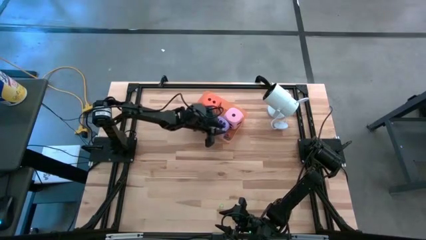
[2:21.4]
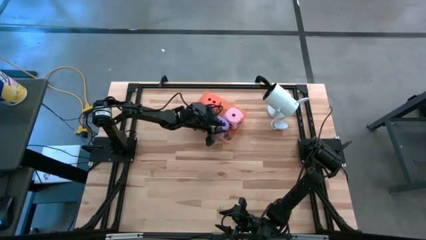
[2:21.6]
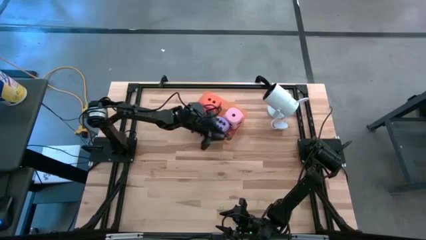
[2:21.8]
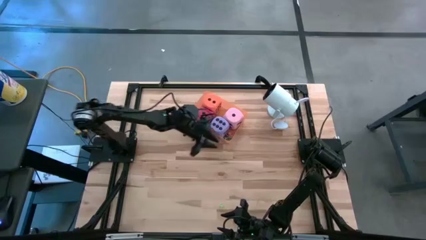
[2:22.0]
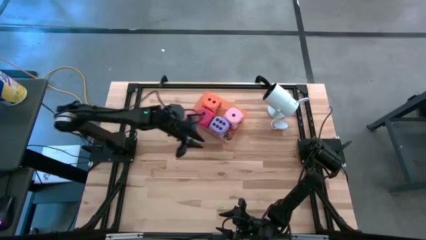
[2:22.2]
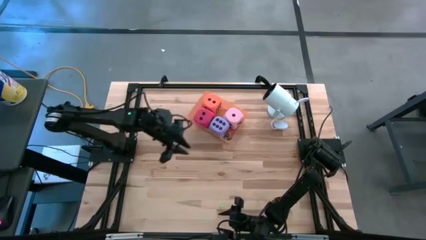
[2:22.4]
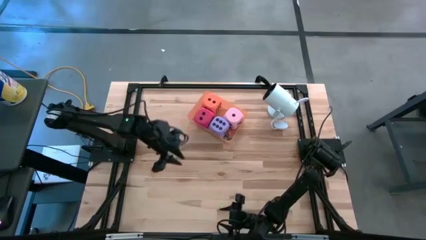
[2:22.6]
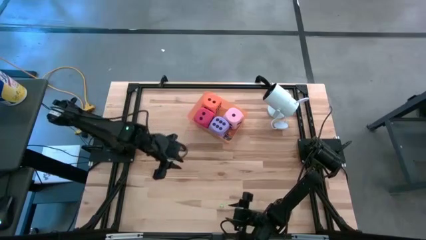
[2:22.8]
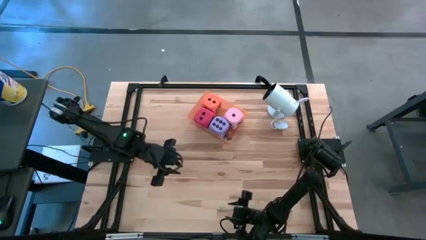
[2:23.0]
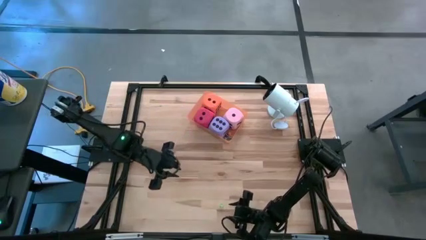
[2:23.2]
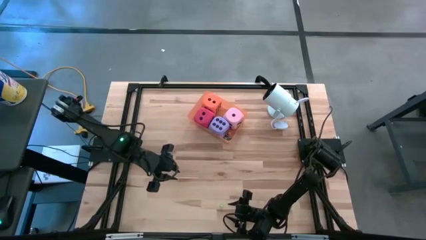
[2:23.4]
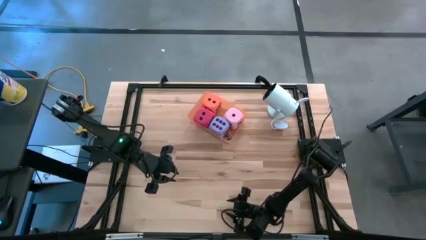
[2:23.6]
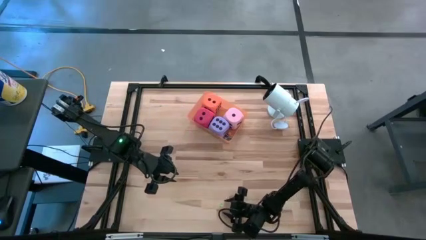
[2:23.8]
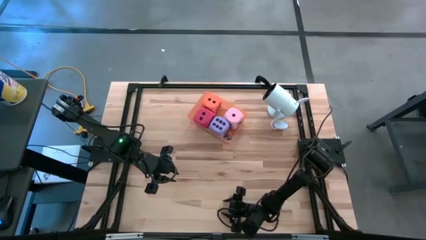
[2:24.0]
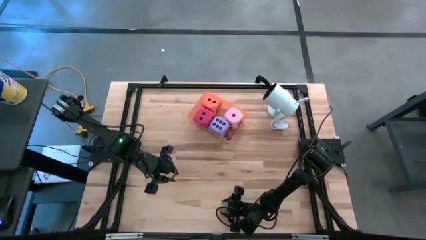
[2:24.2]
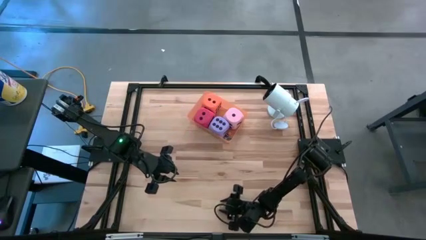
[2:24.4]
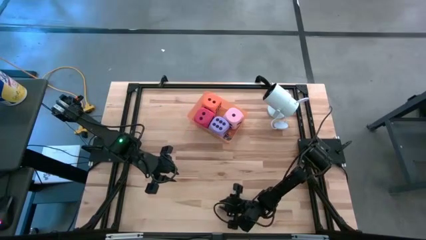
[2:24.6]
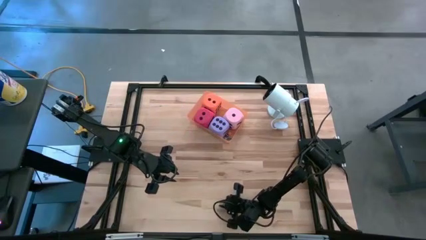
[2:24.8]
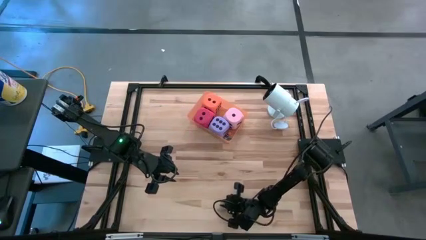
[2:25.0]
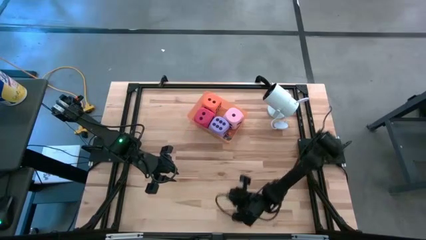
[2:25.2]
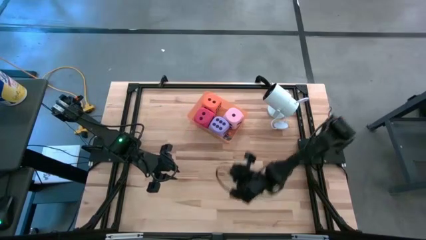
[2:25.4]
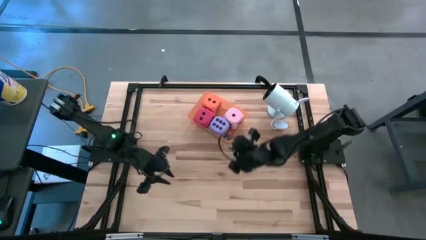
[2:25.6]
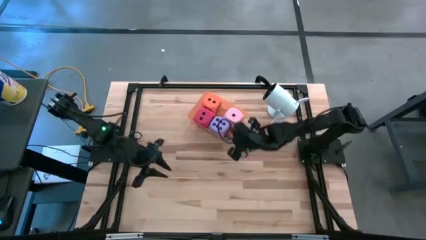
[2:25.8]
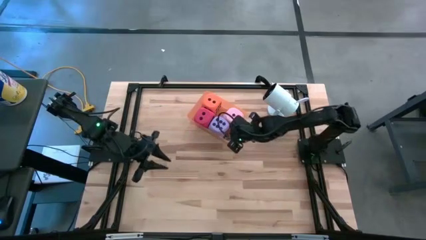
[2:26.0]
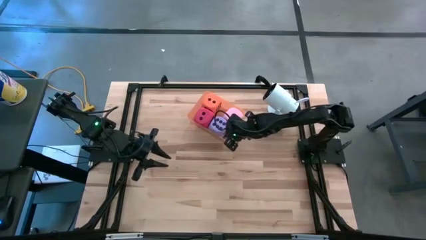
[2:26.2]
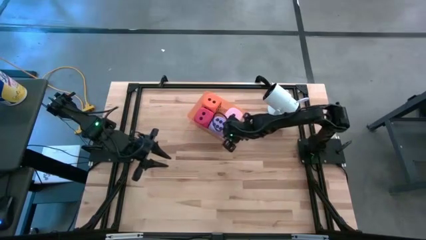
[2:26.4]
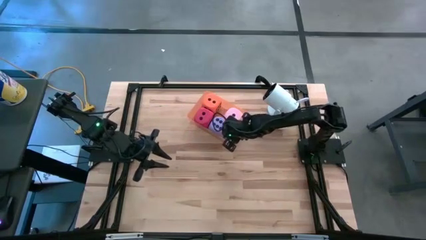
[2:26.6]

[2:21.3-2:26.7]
Task: Pick & Place Dice
Put the small green die into the orange bin

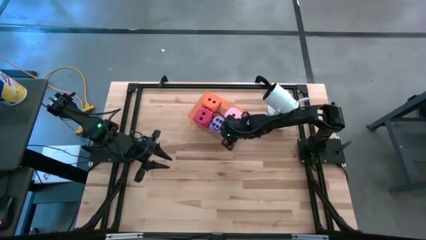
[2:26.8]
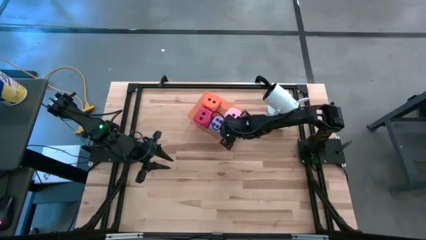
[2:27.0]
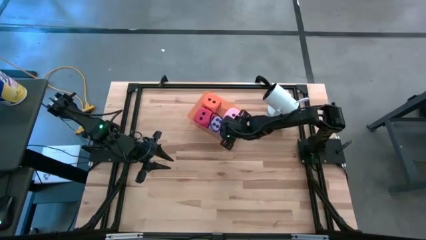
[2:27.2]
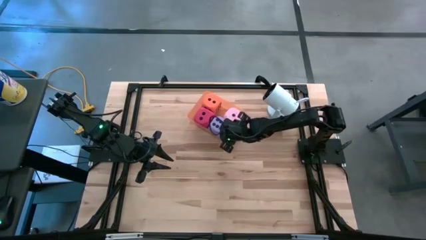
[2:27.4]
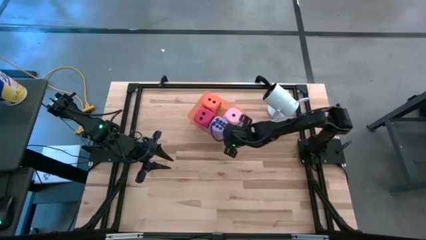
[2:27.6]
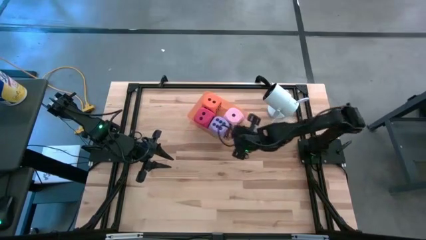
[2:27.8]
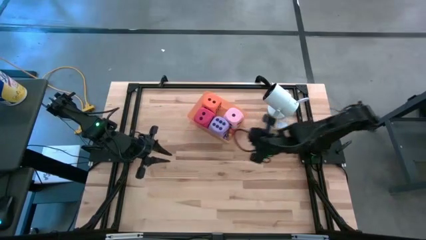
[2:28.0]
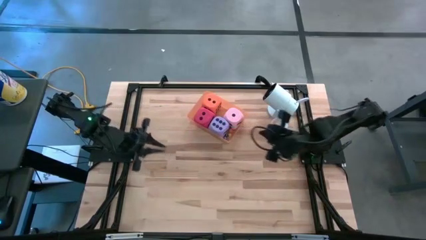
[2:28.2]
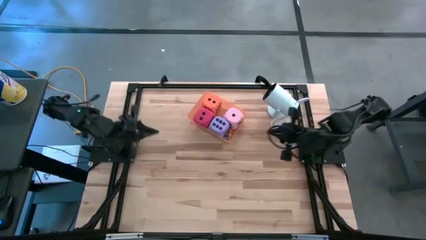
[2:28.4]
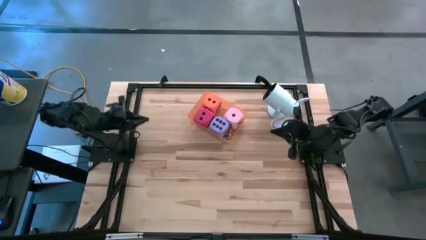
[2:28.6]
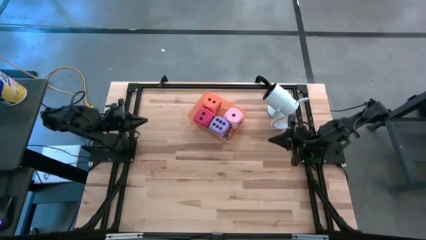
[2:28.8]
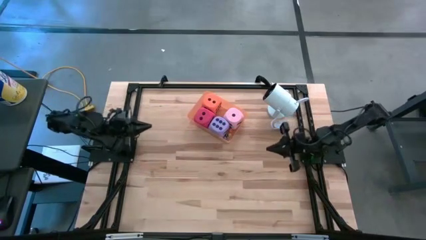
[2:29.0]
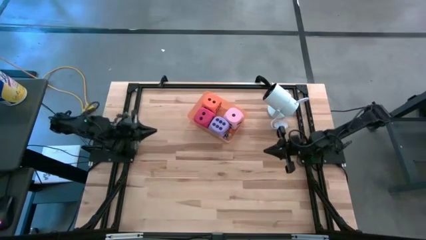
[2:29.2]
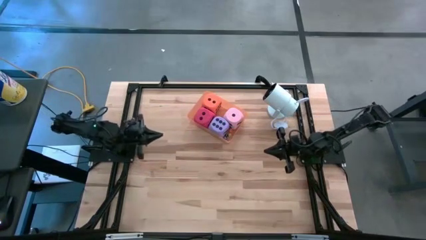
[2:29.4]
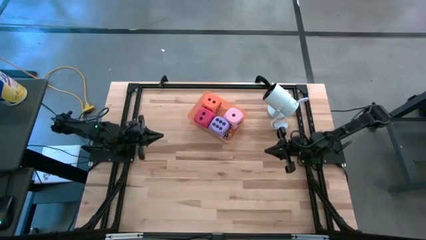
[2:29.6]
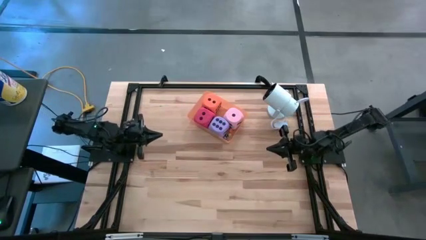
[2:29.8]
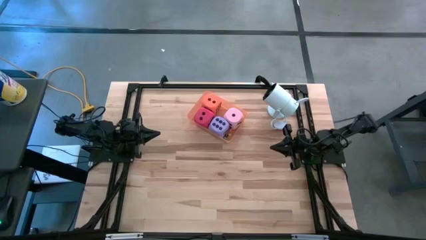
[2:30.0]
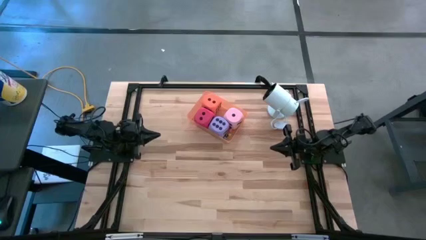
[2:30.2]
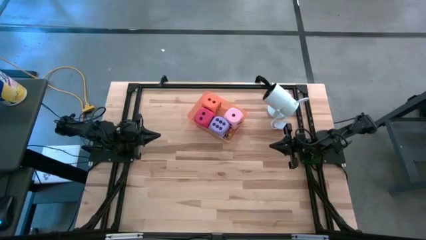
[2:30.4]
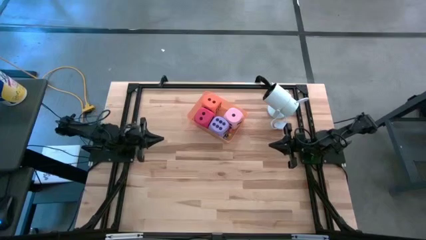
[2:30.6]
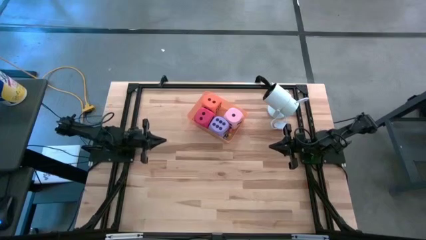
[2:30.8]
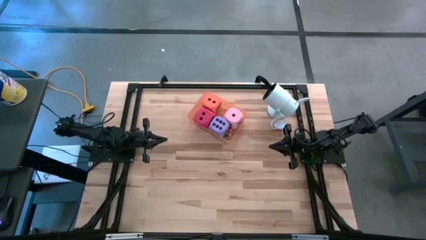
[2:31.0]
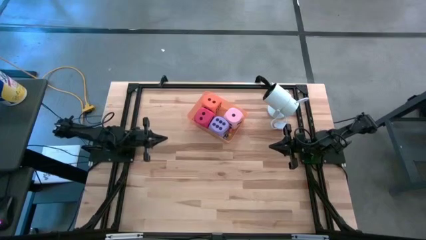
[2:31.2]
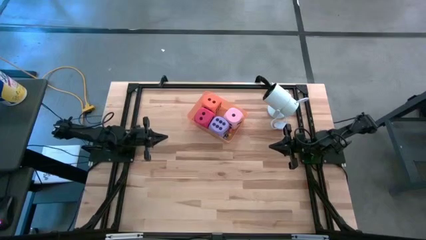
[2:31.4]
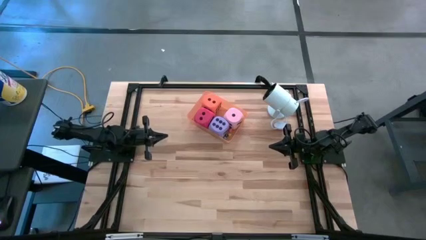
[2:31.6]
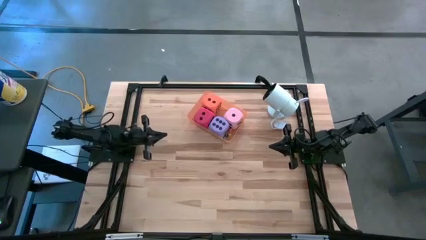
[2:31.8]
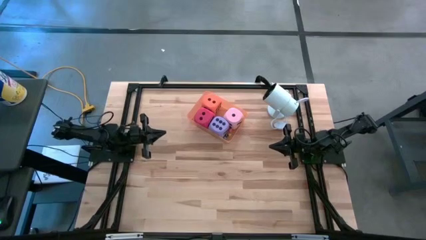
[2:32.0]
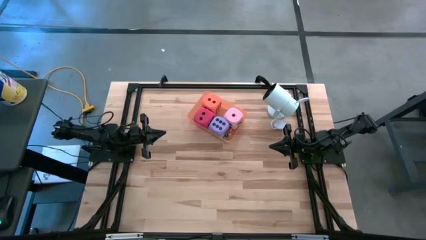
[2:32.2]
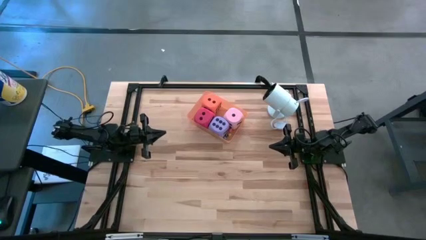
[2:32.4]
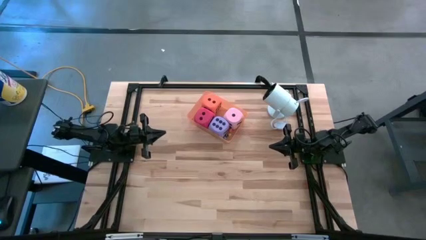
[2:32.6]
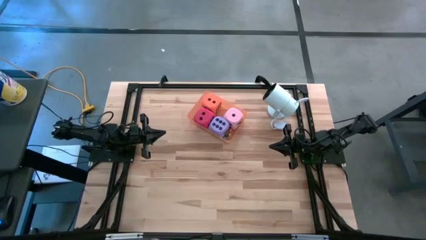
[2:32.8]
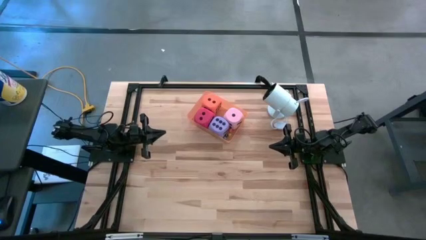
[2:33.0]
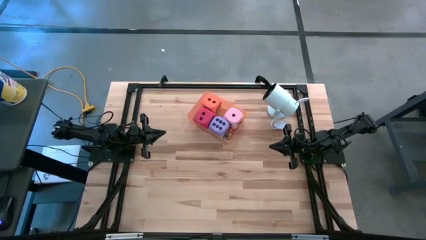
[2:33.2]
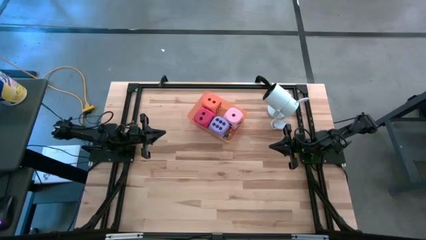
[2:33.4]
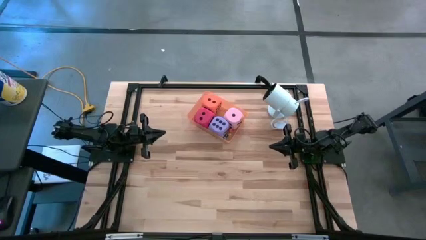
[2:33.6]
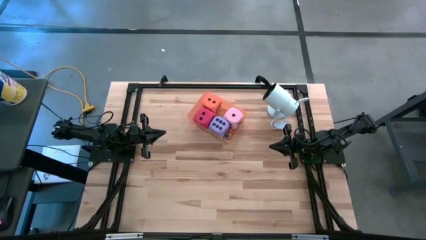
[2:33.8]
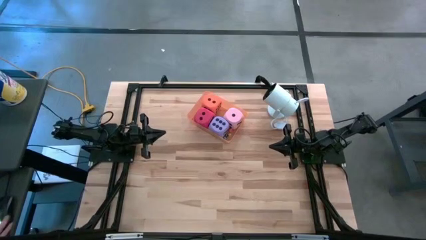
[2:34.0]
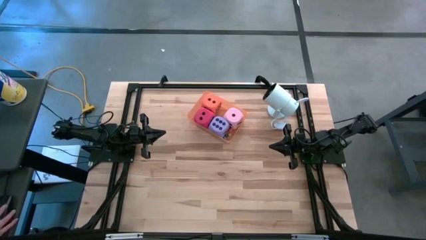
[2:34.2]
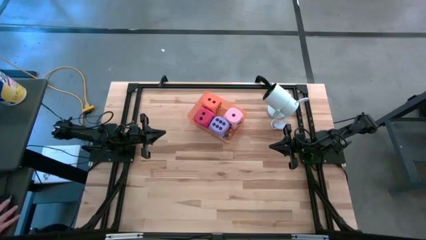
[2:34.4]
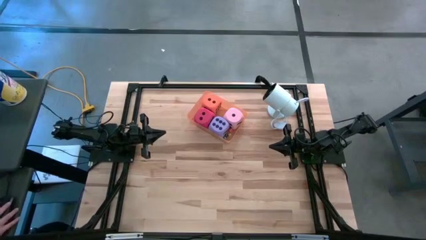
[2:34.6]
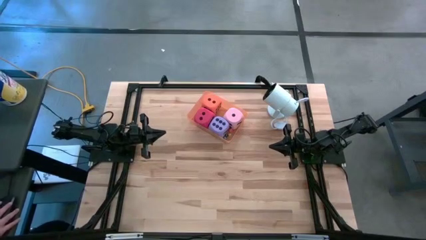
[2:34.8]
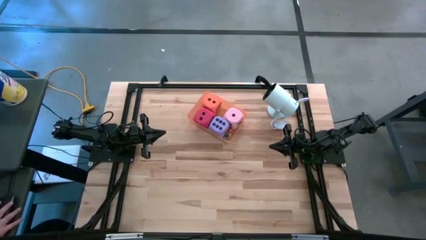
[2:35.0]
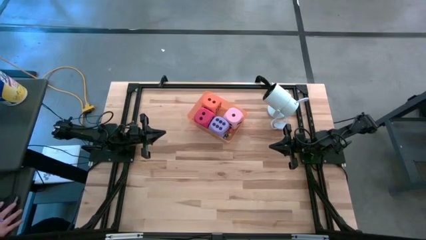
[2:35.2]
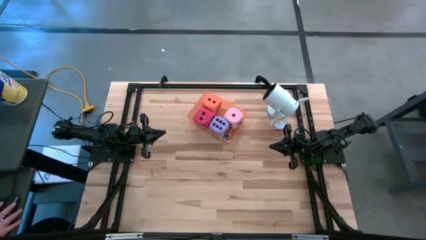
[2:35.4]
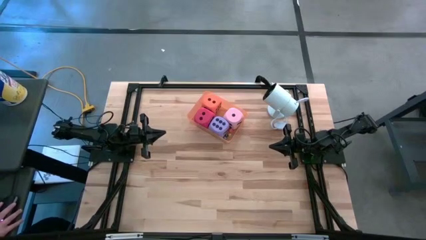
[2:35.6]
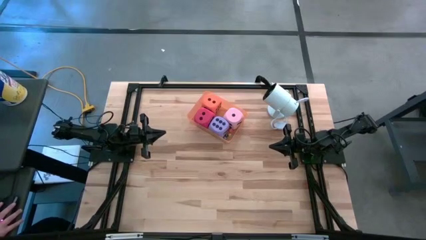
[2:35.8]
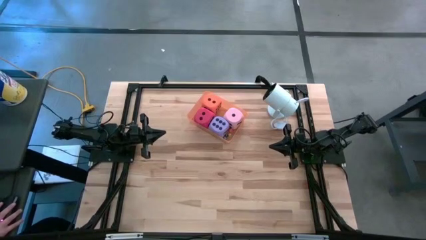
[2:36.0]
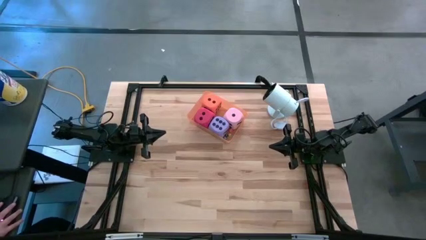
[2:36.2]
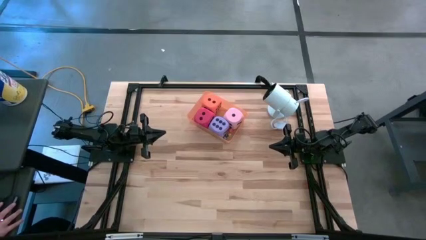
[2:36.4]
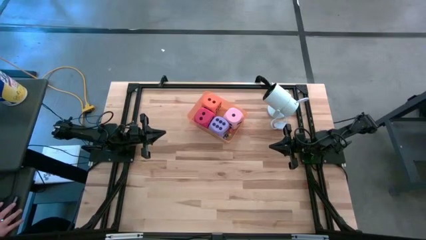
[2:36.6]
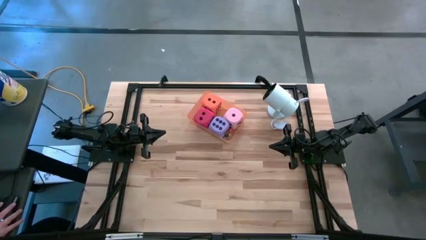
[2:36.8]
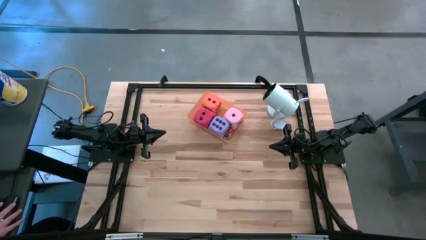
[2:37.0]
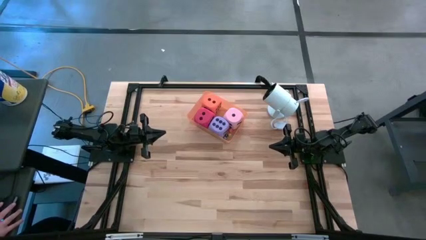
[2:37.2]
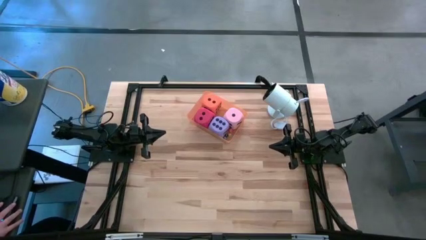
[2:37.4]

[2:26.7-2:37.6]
Return to Home Position
